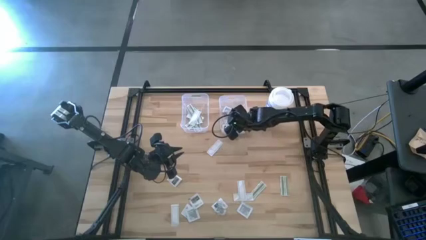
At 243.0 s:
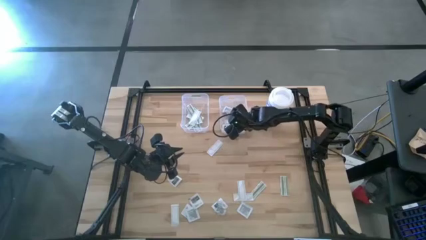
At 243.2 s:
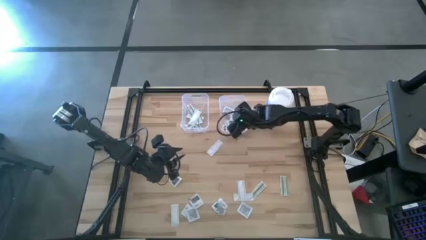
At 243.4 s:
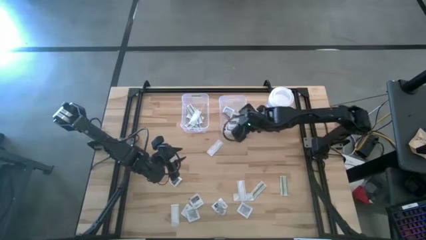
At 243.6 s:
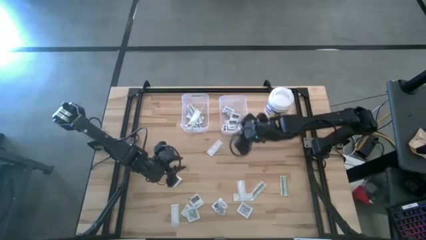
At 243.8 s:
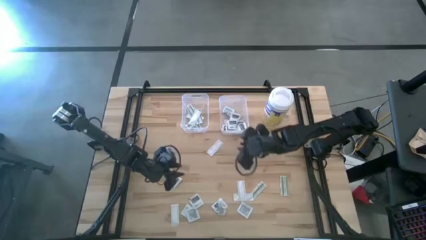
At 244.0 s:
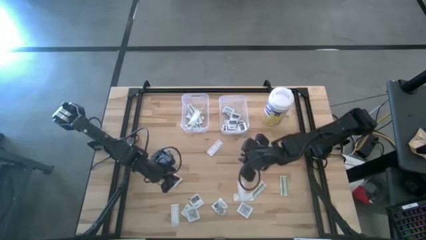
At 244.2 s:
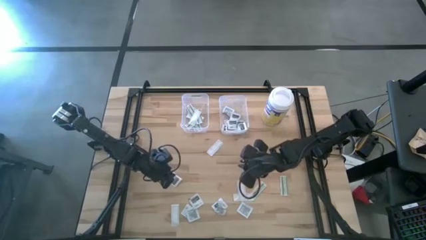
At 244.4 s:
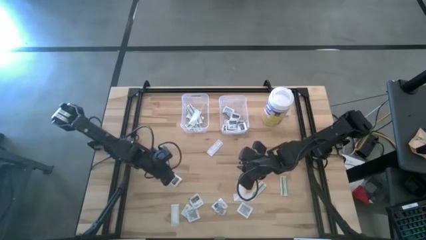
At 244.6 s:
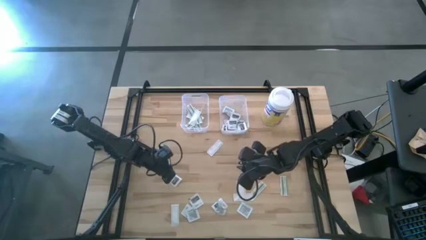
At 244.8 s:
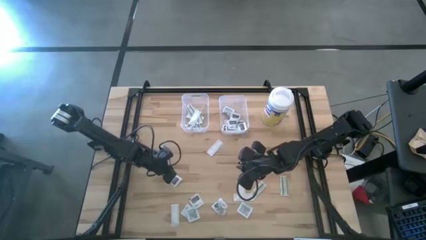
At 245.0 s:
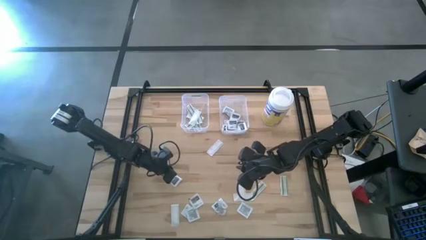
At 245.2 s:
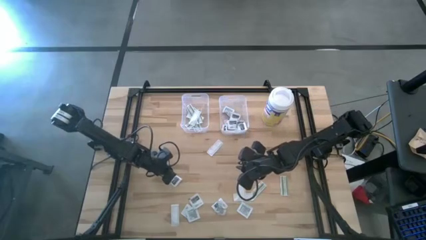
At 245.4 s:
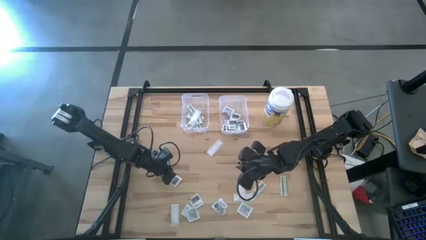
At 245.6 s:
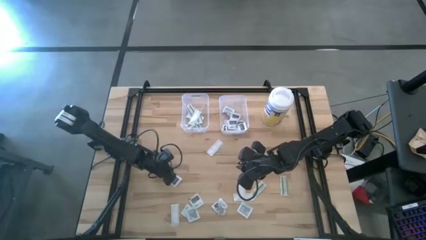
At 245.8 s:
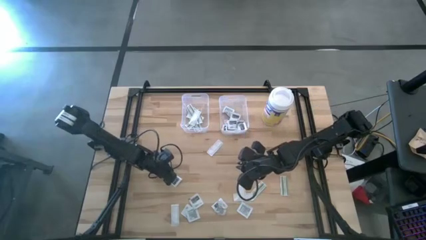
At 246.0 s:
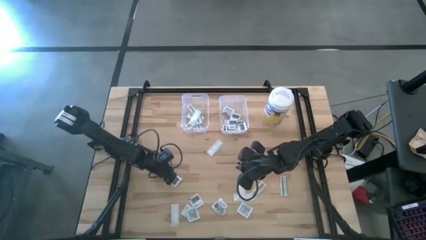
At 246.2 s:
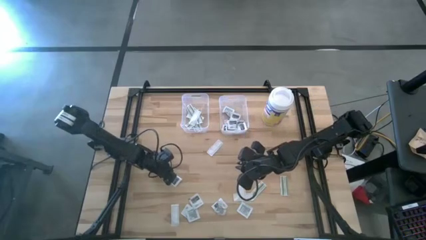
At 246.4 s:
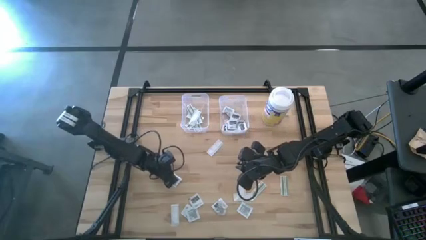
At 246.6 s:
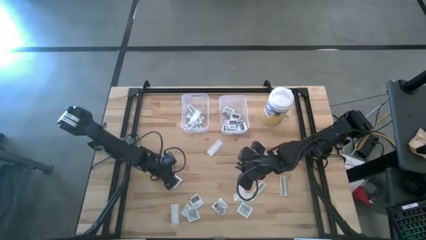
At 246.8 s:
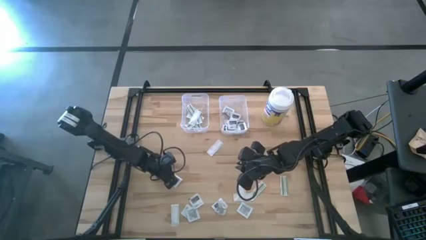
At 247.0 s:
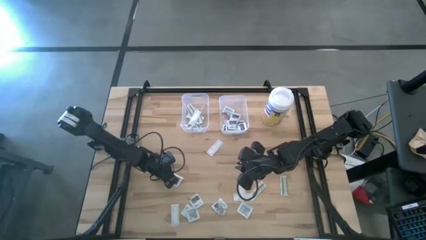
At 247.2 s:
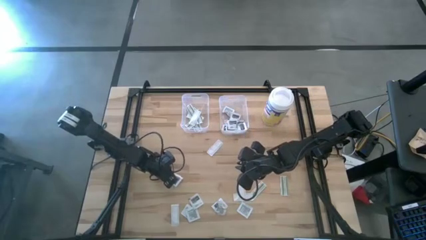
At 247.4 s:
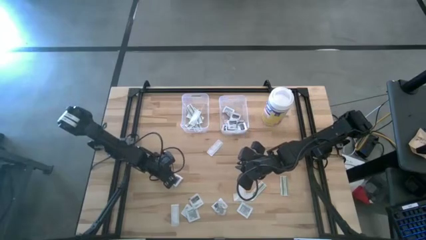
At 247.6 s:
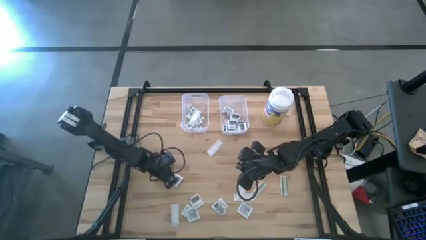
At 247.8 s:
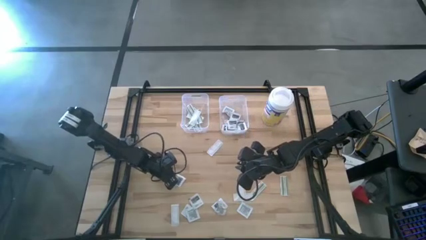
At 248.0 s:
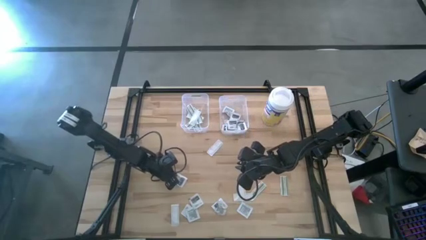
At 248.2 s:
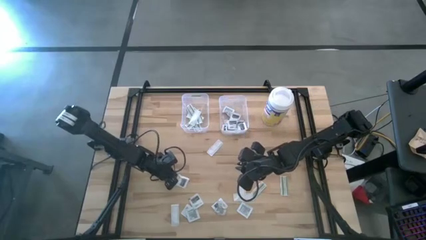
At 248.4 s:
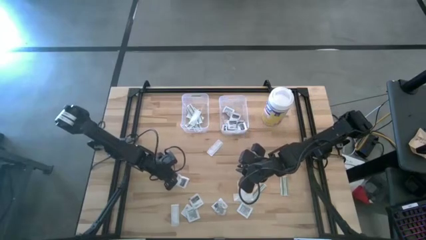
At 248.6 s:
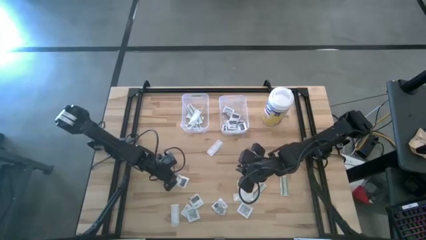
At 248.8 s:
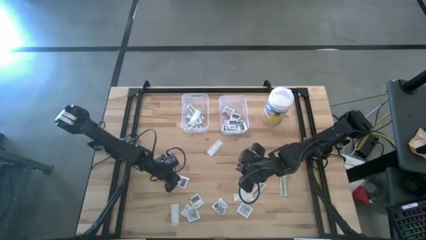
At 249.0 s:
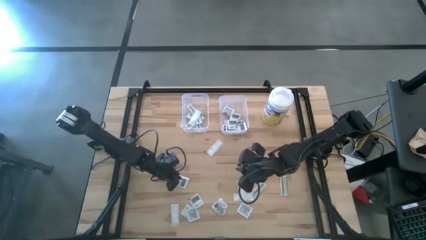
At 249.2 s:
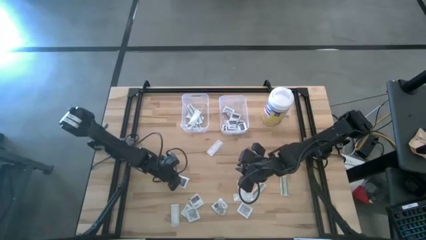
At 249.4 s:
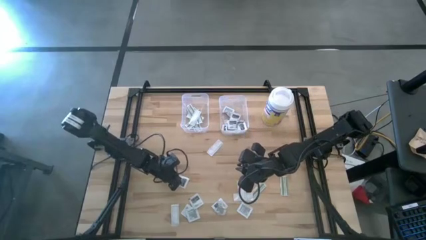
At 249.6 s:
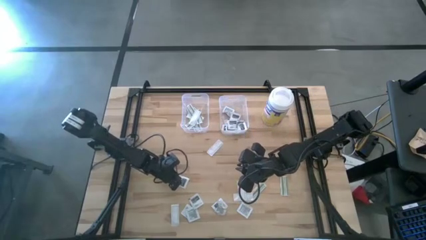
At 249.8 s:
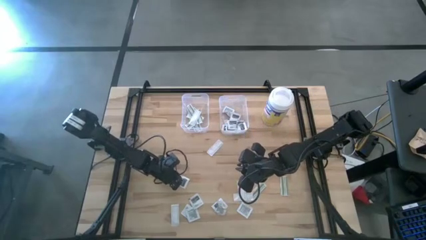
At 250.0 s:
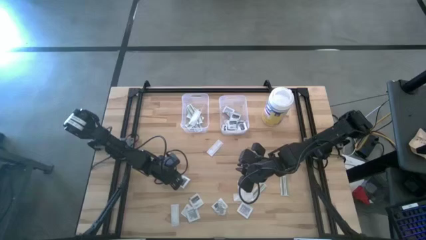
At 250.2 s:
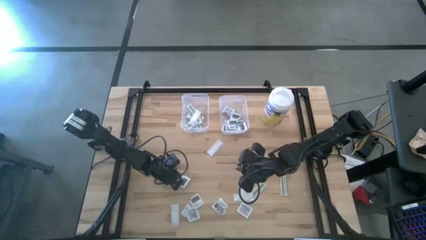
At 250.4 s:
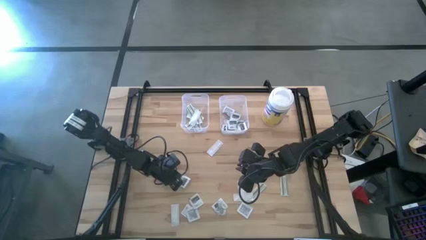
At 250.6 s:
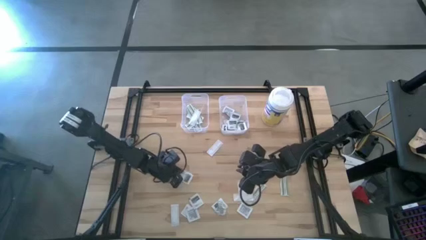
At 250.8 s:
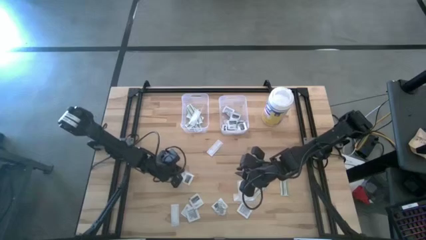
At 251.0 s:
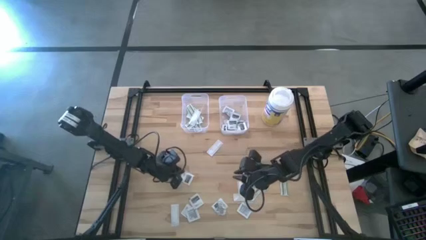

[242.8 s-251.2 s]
Task: Pick & Place First Aid Supplies
Put the gray towelette pack into the right transparent bin

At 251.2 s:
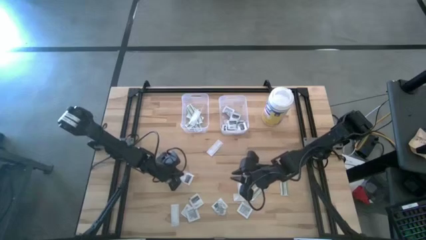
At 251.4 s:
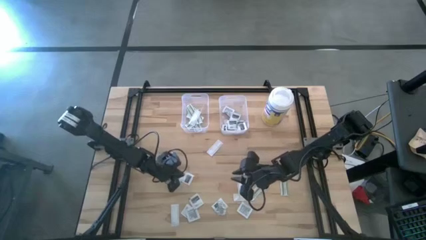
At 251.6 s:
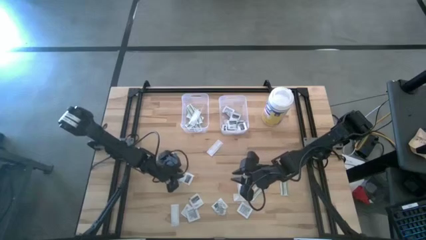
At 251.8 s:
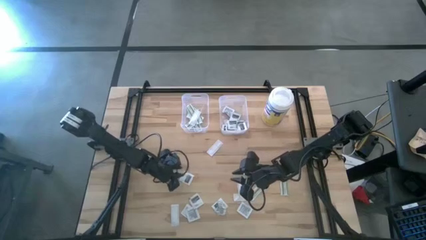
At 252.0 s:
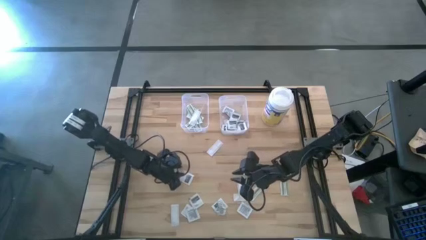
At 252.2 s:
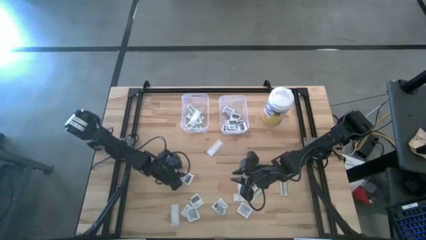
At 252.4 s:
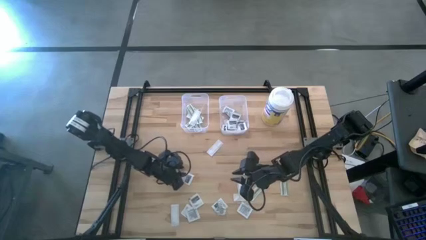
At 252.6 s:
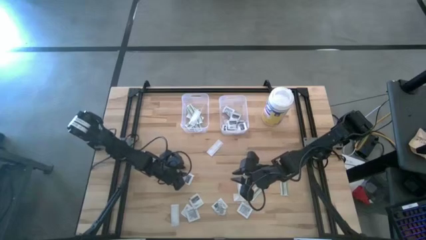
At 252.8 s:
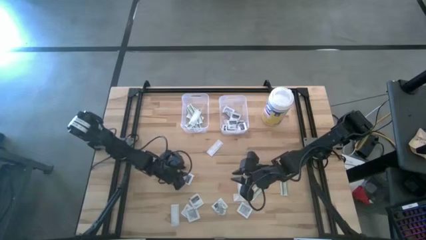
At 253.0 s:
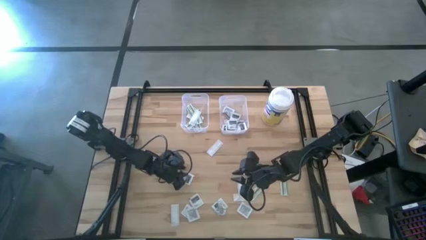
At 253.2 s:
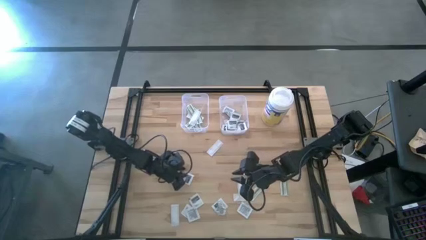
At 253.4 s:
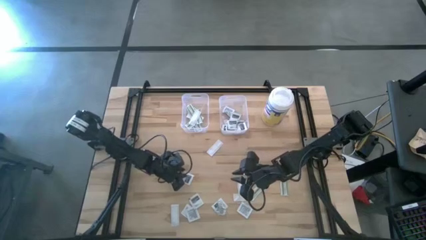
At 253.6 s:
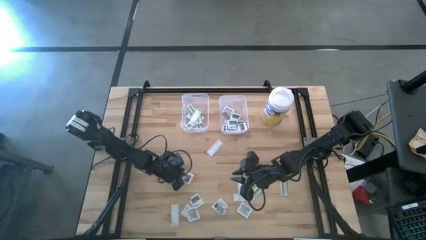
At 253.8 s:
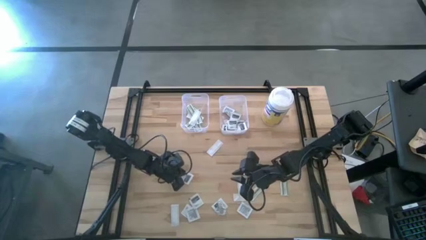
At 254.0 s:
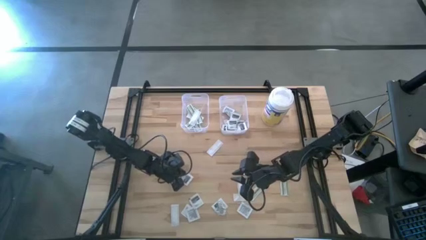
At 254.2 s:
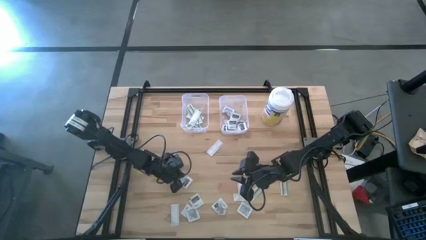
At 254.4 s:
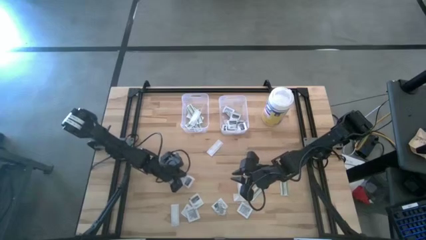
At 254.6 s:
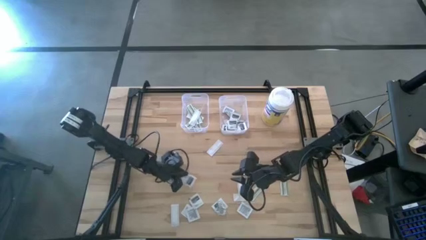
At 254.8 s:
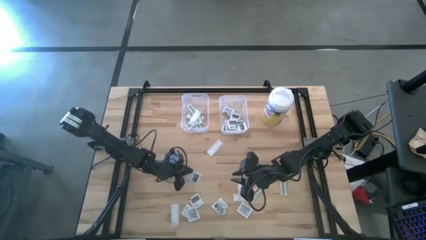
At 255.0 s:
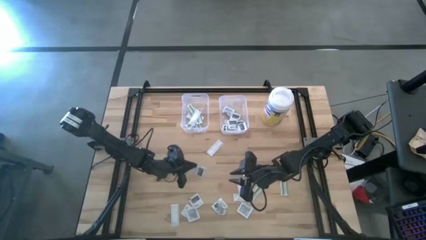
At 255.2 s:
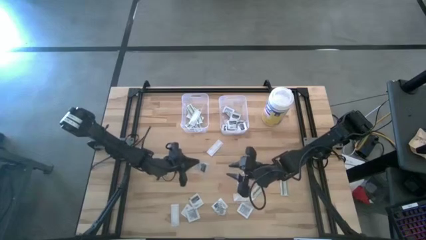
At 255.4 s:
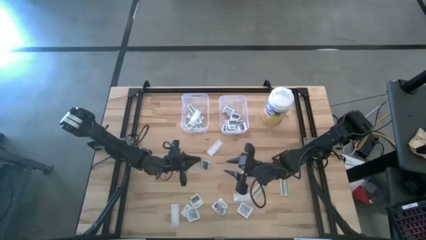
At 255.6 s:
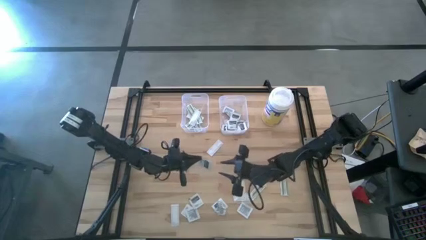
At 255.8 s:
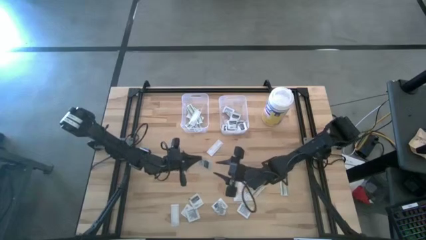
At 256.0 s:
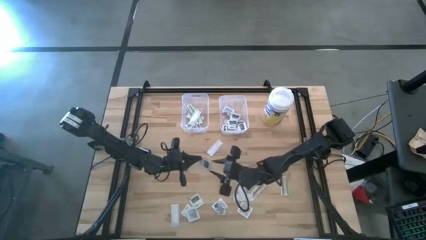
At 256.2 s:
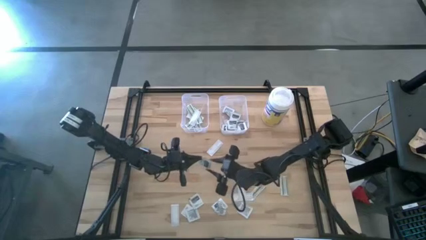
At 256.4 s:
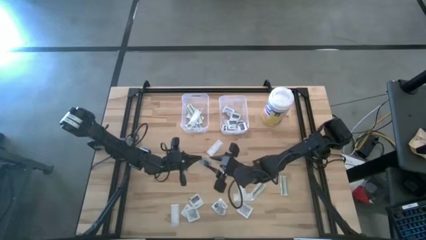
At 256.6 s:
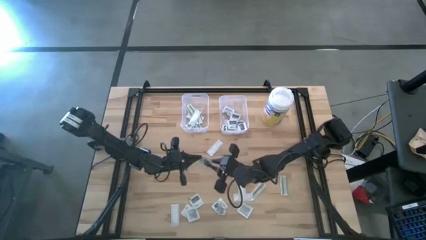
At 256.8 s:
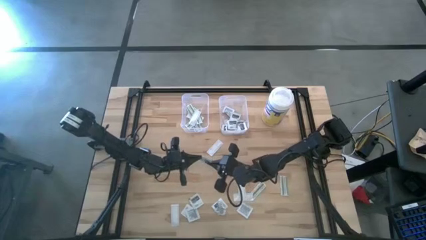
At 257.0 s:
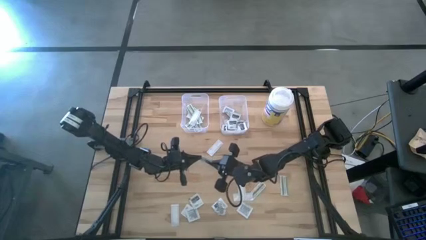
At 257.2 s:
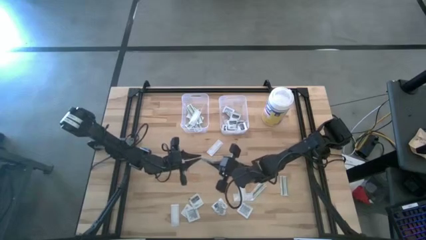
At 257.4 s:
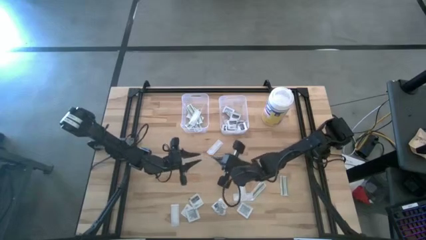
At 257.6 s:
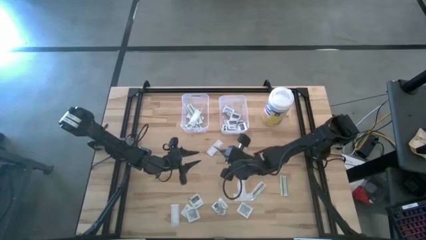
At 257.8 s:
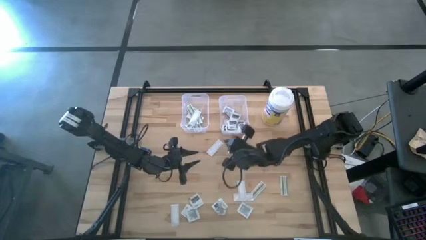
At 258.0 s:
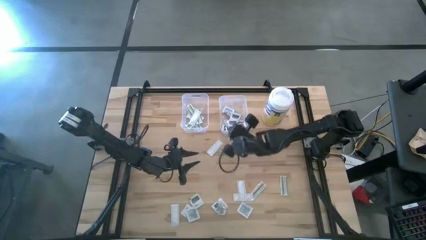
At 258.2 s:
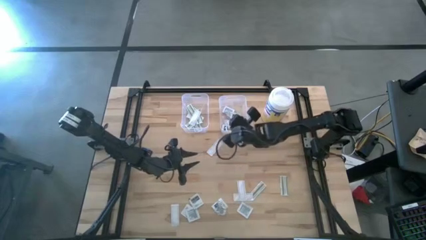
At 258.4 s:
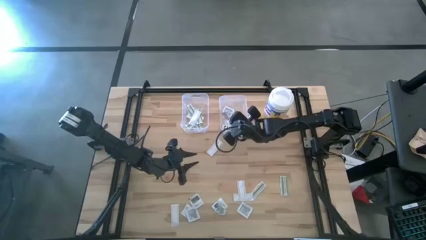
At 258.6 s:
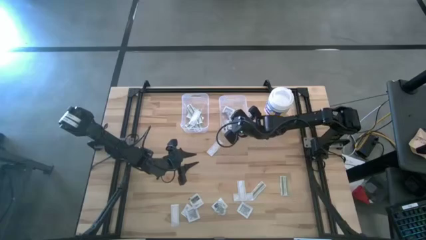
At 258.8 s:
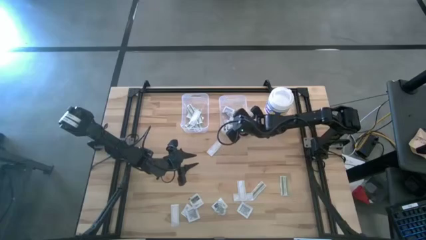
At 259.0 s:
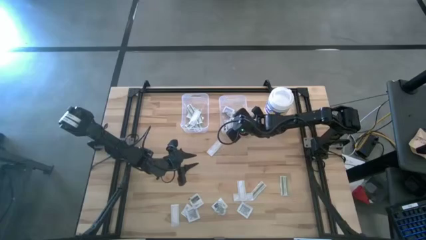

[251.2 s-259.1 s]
Put the gray towelette pack into the right transparent bin
